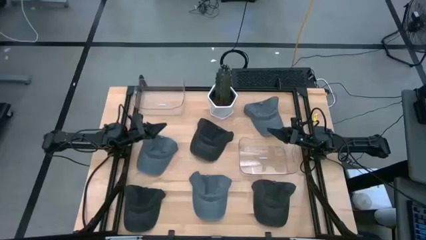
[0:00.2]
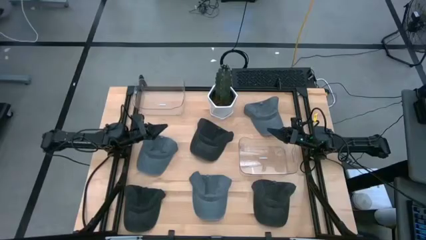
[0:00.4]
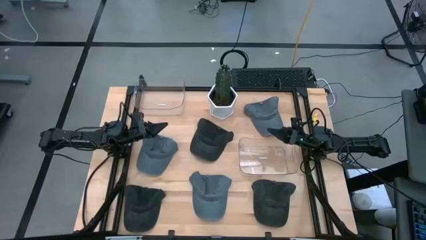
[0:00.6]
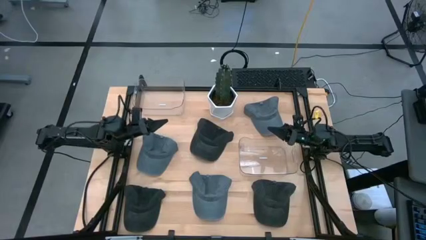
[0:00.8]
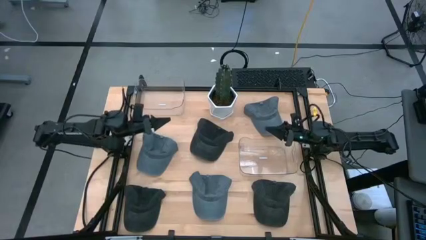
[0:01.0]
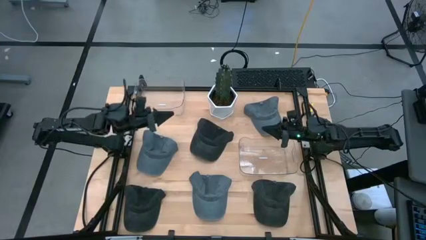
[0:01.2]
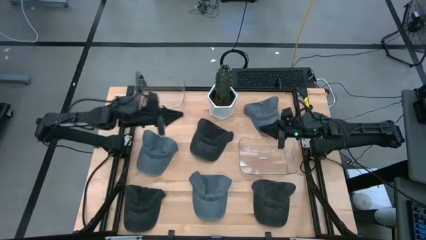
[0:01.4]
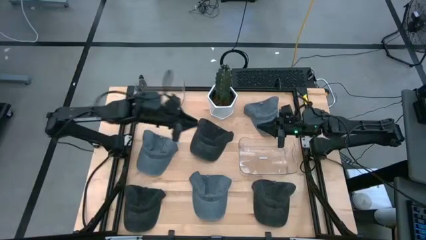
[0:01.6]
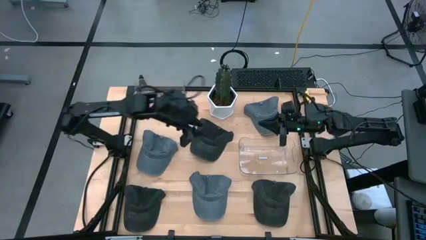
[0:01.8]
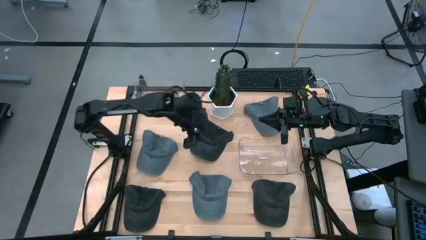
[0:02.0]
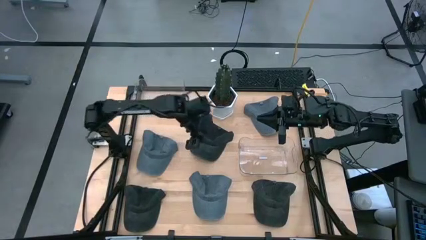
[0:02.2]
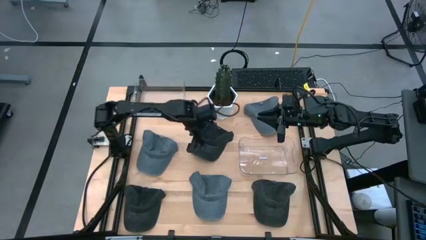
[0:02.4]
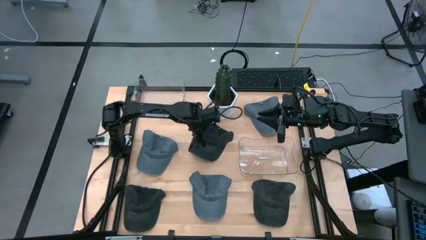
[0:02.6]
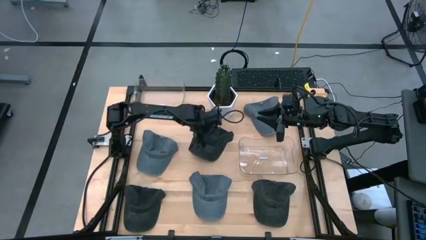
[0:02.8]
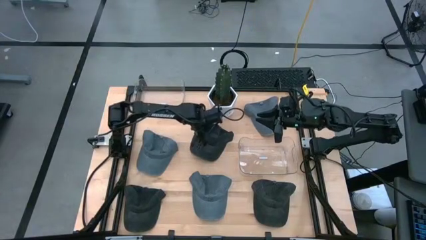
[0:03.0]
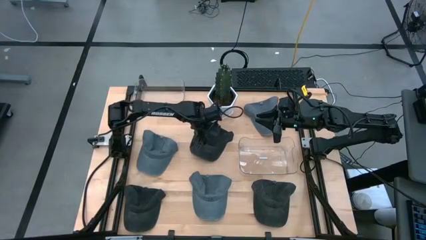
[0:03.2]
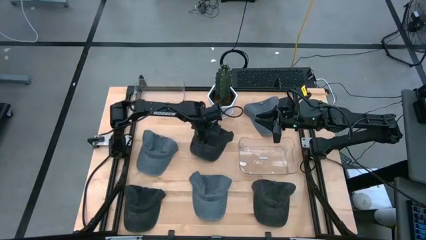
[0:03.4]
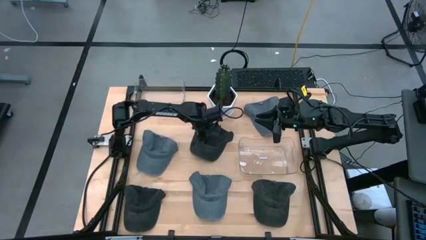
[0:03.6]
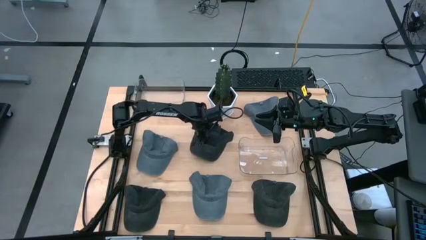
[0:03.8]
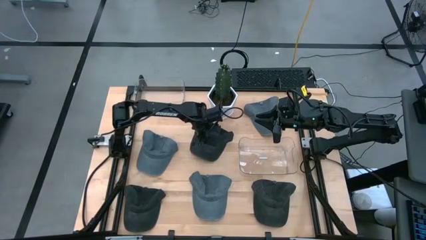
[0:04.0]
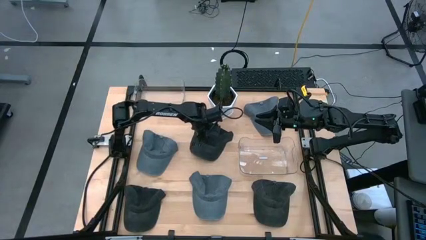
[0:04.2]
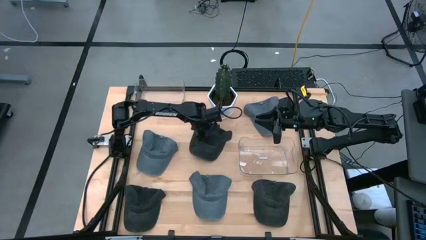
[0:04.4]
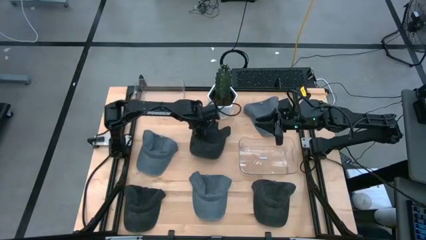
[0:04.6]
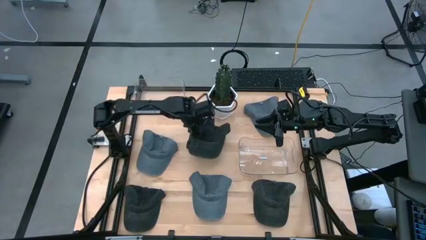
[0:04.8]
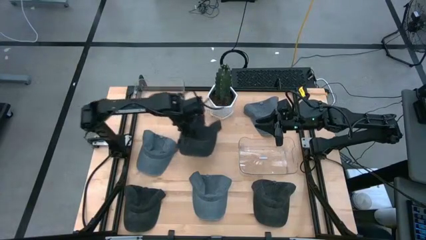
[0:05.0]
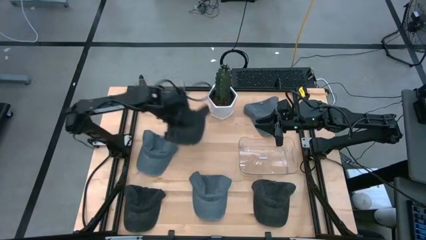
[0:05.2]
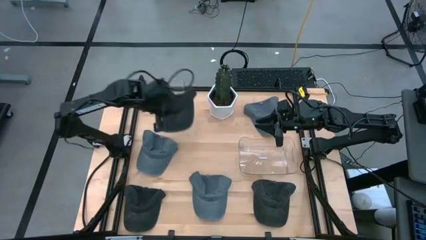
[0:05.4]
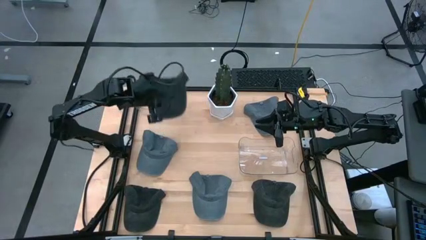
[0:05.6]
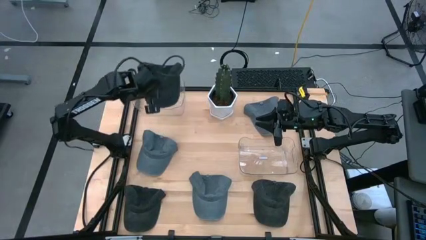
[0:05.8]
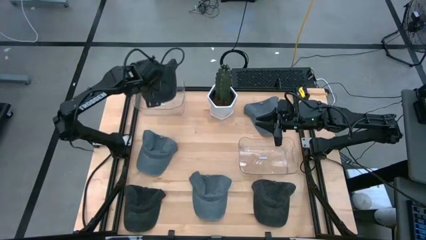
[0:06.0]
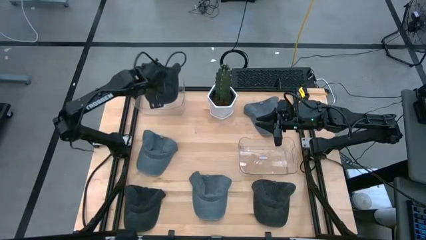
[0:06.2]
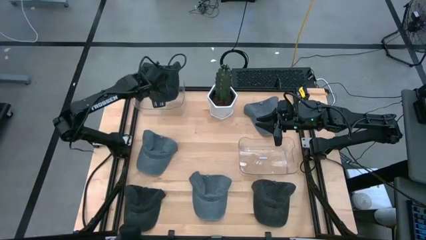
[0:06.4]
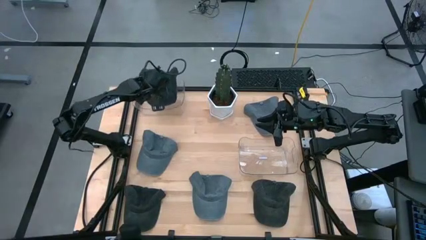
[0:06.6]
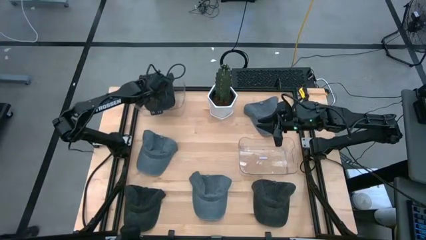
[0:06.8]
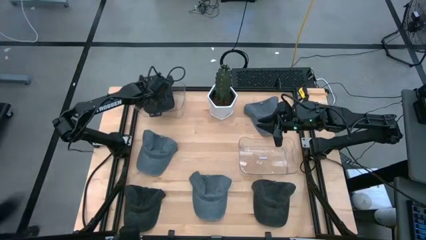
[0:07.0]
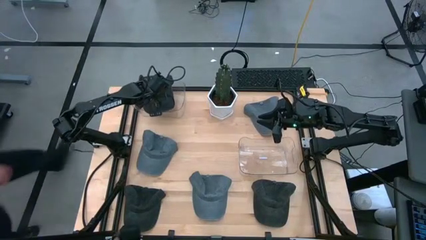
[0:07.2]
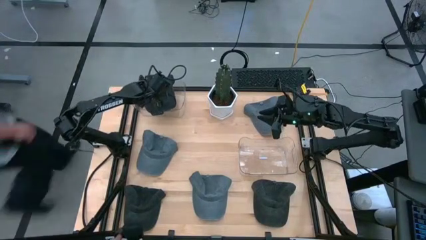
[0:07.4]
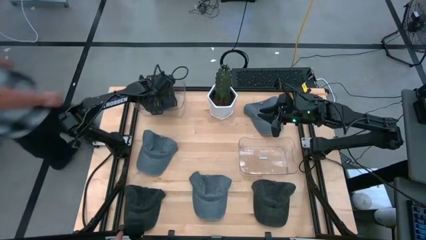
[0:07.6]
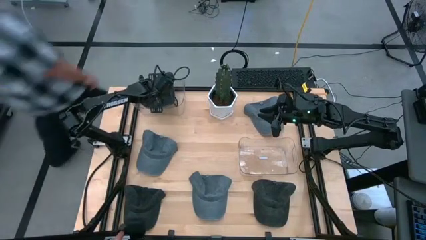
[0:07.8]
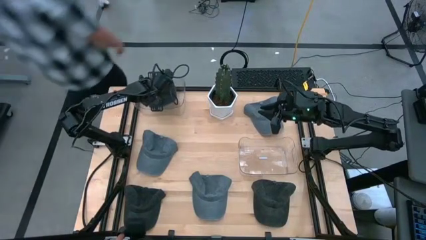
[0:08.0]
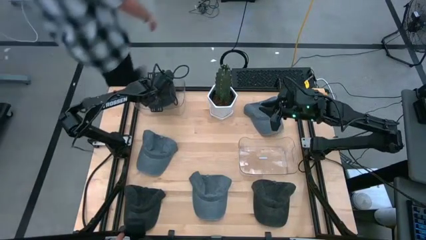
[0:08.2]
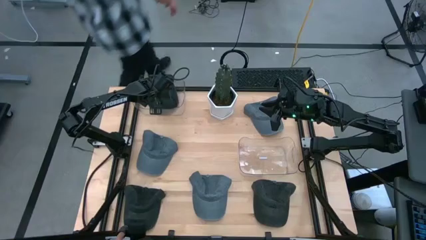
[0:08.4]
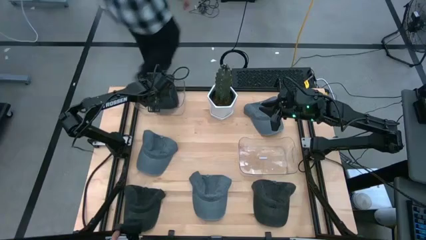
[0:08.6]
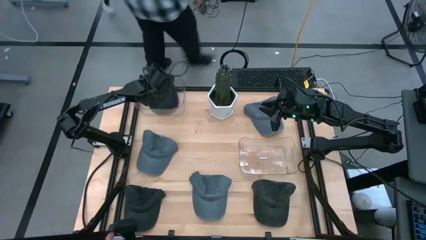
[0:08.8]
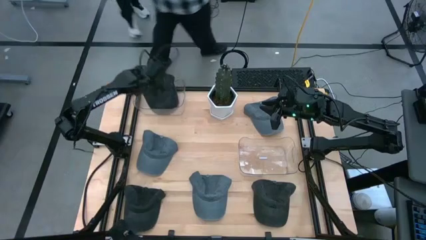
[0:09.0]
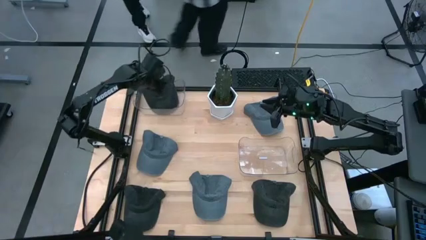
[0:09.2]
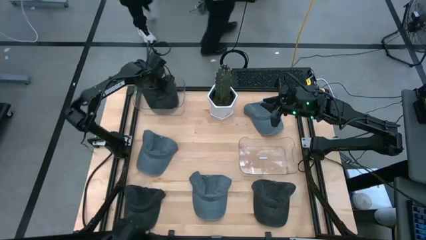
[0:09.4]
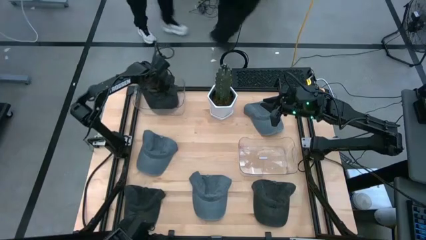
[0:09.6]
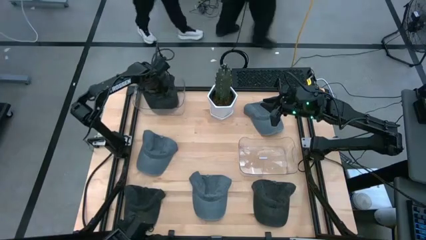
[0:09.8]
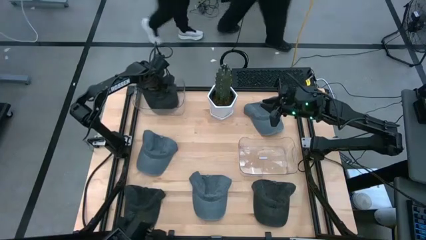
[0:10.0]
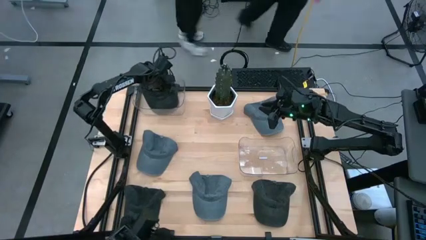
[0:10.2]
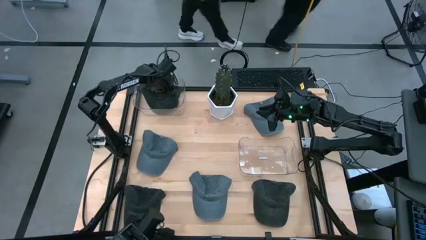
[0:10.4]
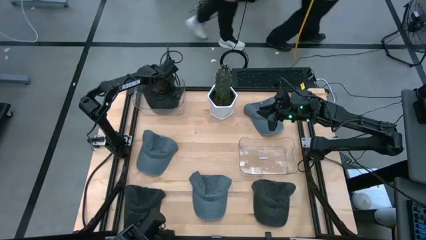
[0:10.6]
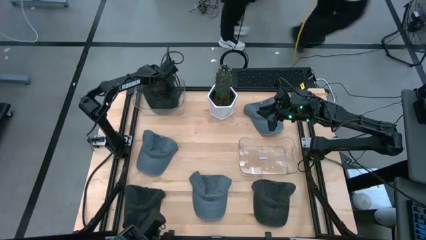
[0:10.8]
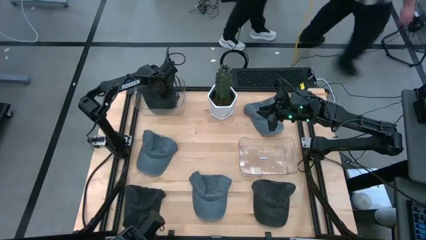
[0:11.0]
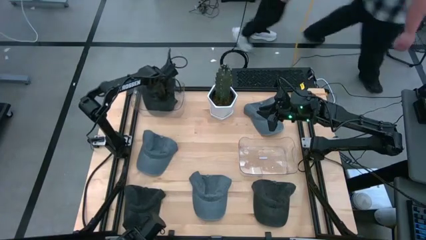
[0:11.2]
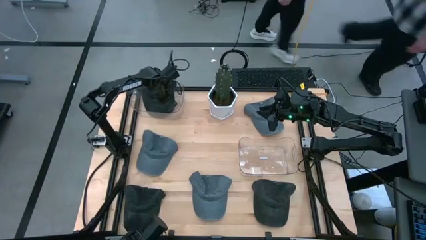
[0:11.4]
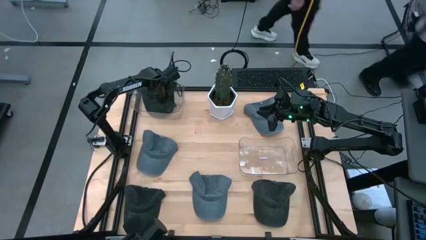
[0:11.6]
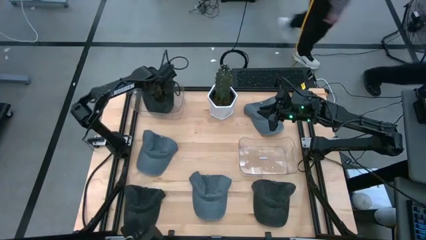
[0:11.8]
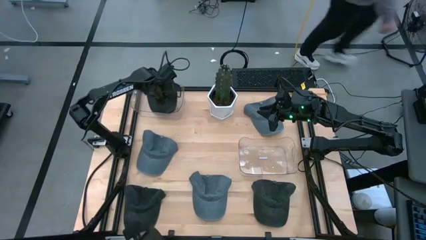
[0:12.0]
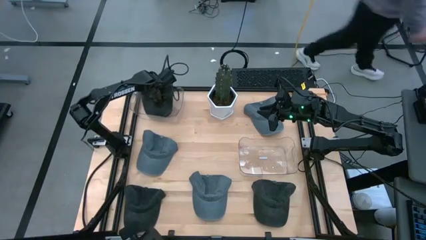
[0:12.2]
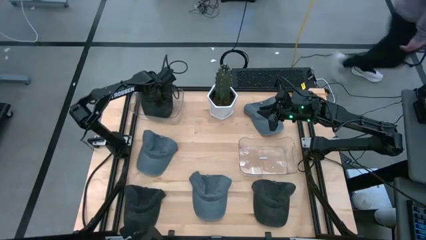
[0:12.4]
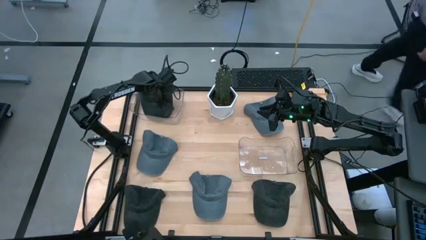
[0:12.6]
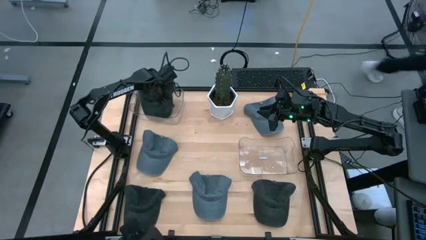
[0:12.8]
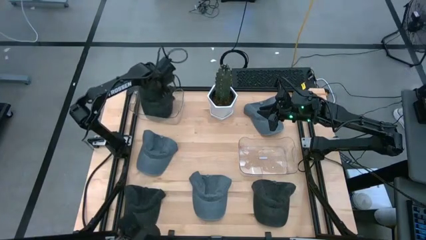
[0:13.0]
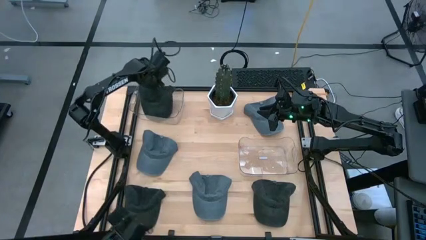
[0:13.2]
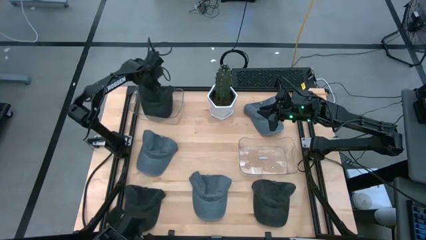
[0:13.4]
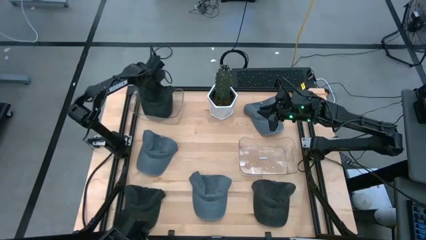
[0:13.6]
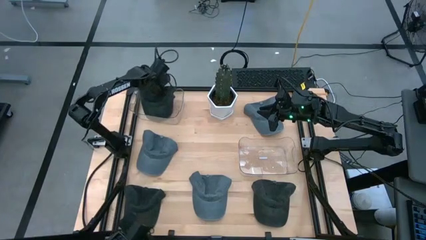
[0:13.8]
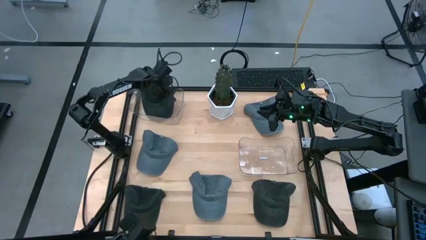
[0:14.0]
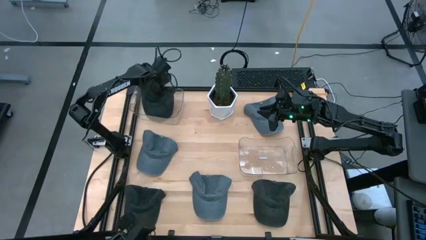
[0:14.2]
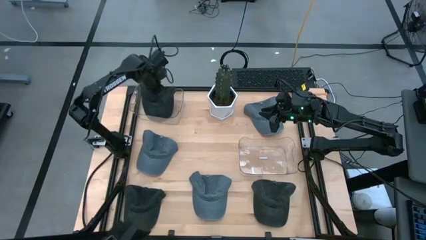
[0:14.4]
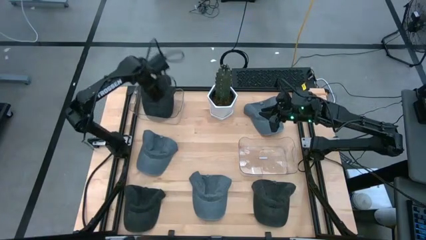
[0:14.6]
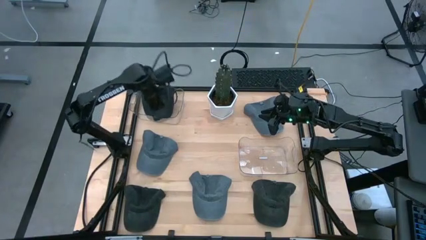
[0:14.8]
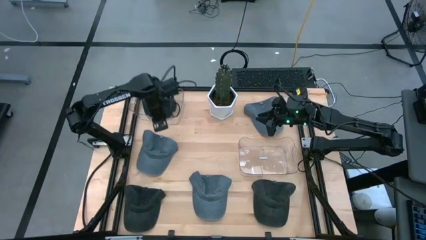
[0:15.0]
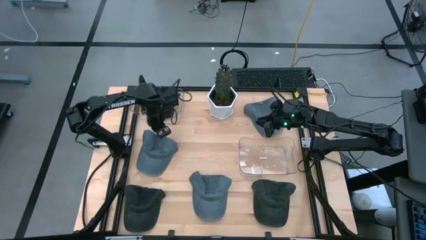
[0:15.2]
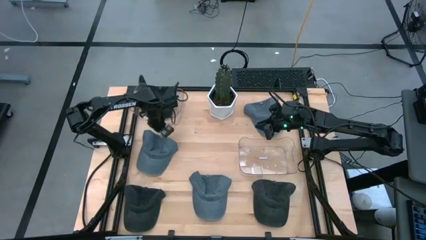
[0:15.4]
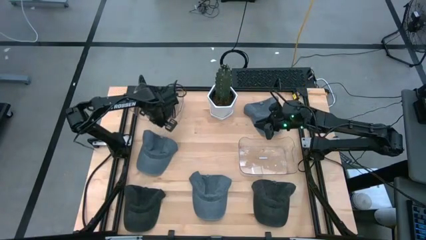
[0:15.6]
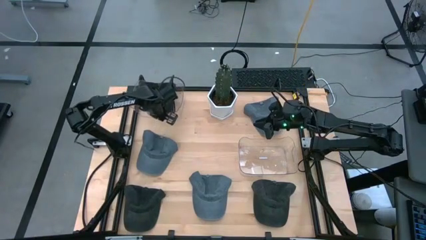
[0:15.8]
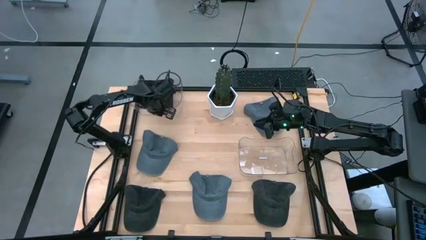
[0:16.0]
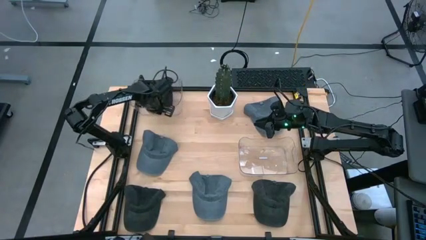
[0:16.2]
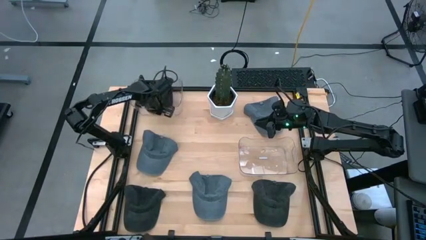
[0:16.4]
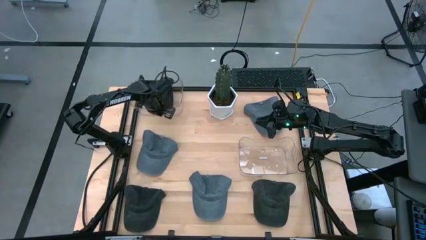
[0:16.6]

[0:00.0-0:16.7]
Task: Pick & Place hat
Put the middle top black cap into the top transparent bin
